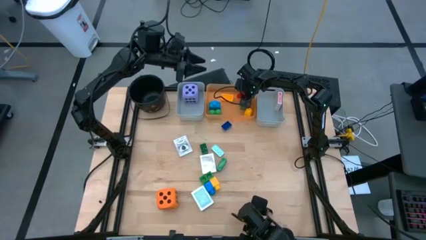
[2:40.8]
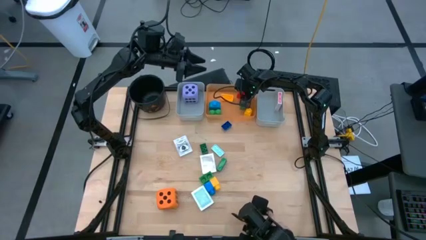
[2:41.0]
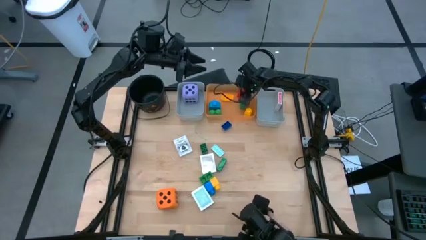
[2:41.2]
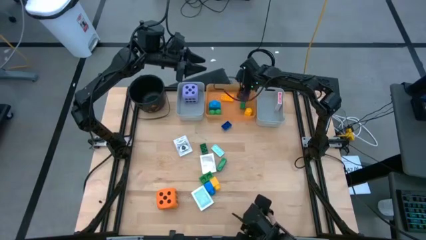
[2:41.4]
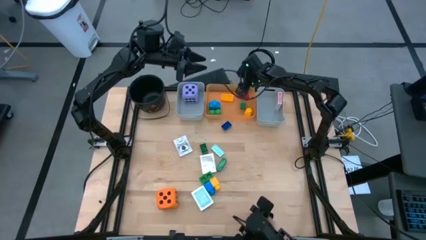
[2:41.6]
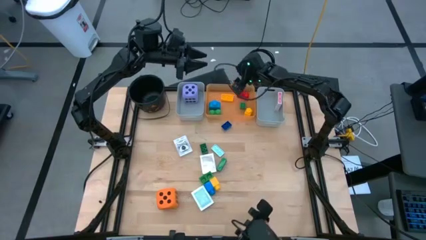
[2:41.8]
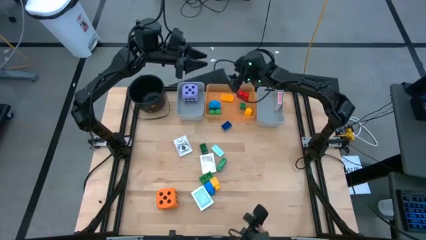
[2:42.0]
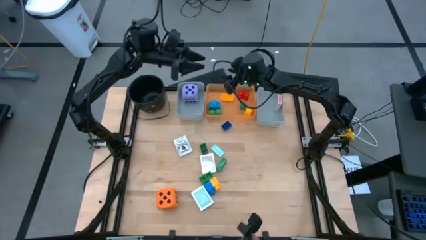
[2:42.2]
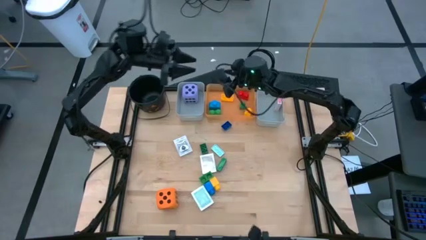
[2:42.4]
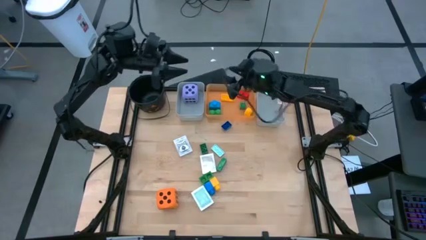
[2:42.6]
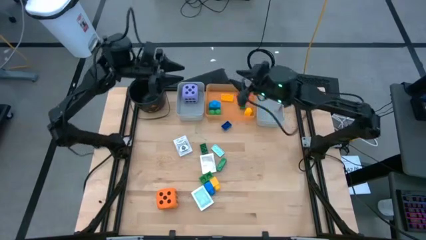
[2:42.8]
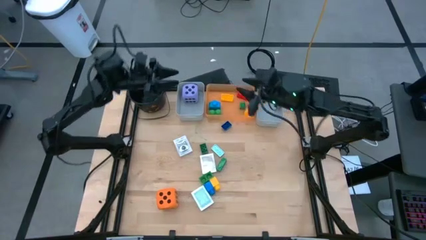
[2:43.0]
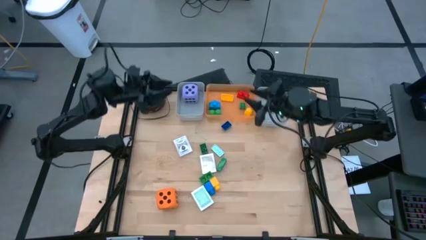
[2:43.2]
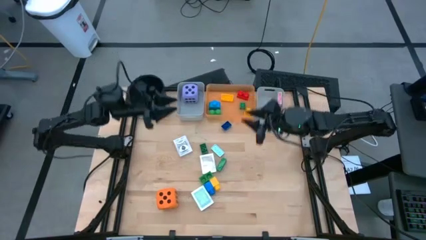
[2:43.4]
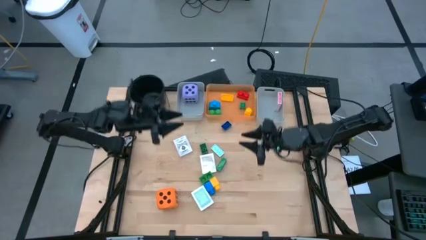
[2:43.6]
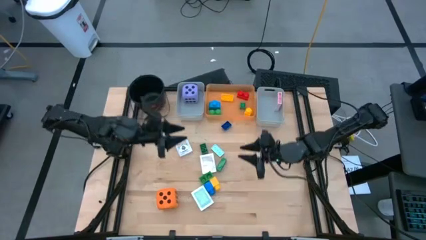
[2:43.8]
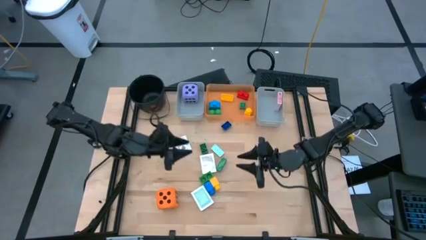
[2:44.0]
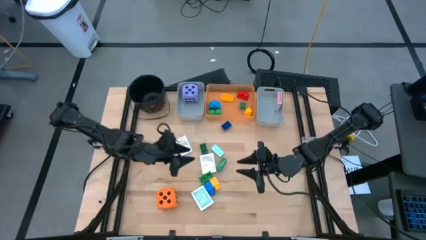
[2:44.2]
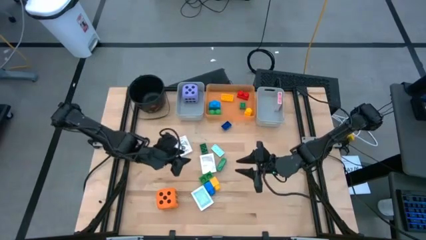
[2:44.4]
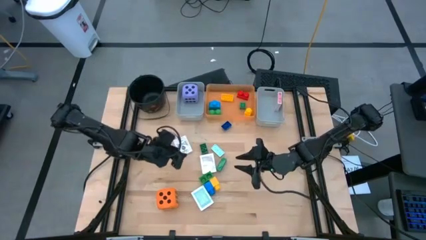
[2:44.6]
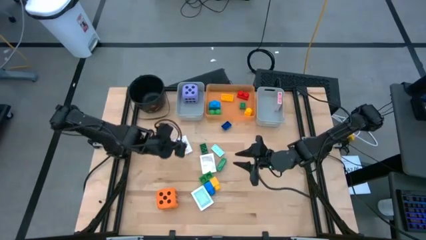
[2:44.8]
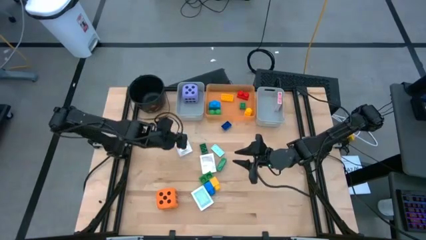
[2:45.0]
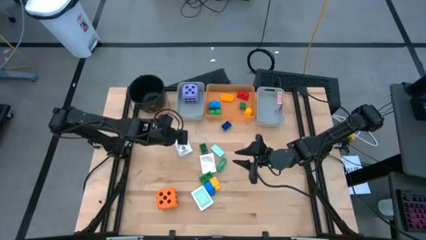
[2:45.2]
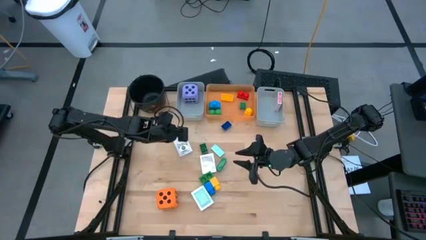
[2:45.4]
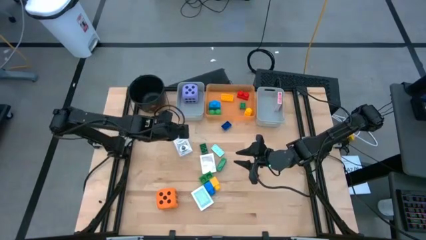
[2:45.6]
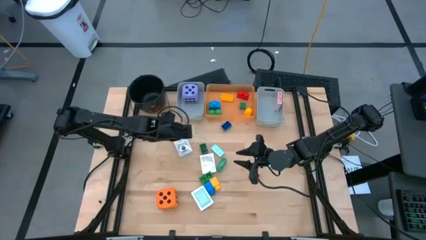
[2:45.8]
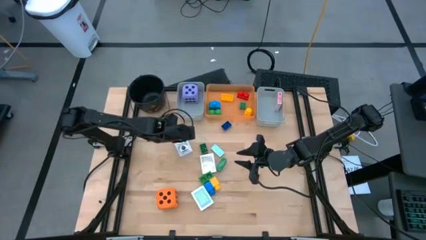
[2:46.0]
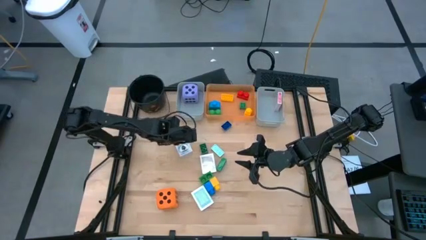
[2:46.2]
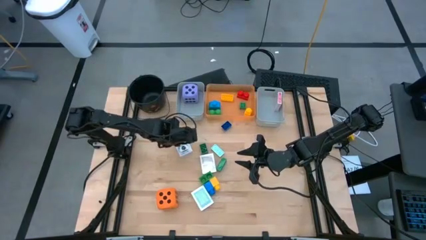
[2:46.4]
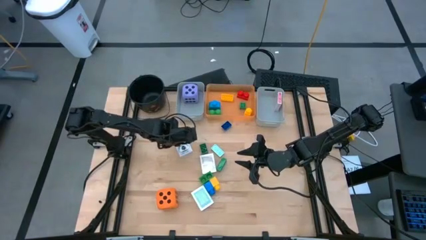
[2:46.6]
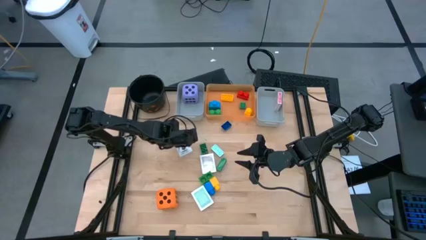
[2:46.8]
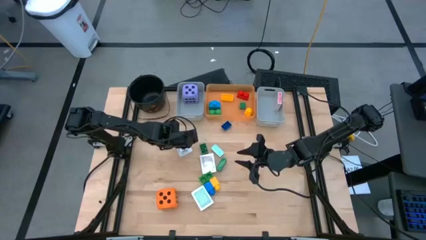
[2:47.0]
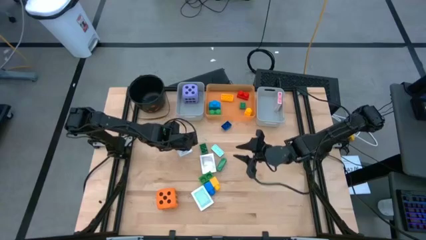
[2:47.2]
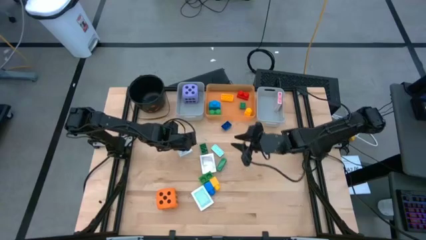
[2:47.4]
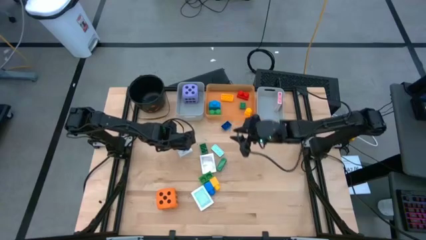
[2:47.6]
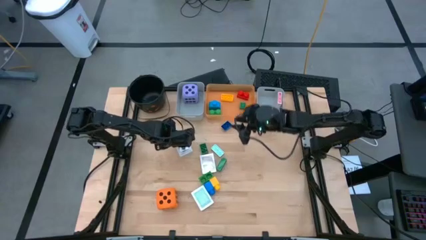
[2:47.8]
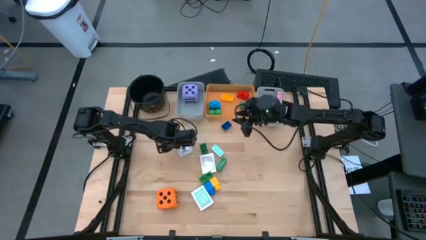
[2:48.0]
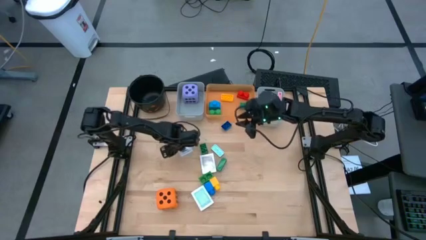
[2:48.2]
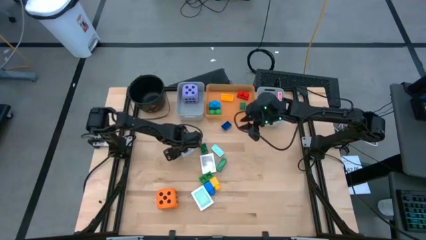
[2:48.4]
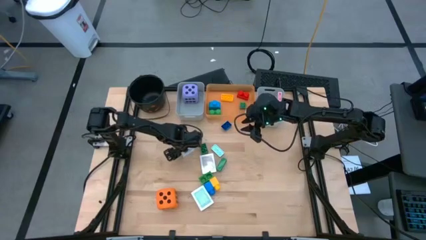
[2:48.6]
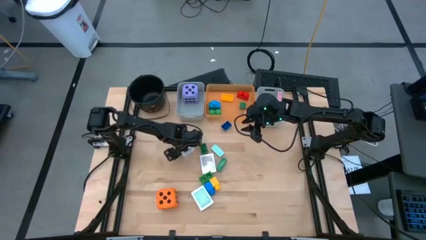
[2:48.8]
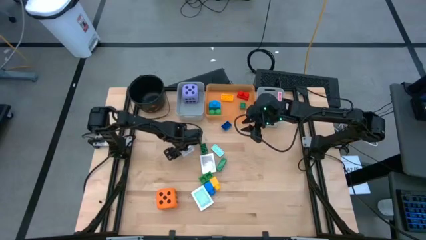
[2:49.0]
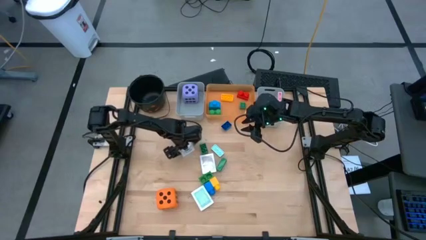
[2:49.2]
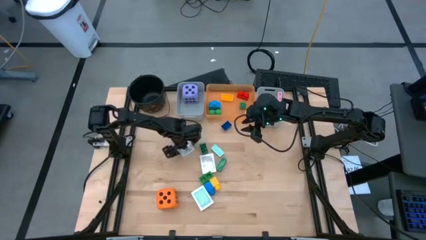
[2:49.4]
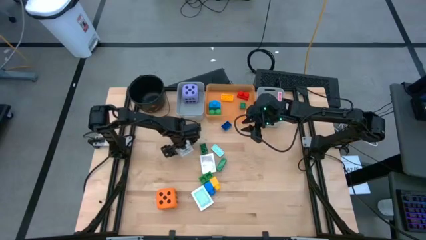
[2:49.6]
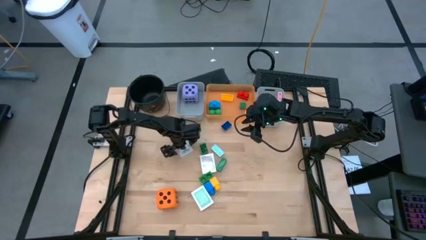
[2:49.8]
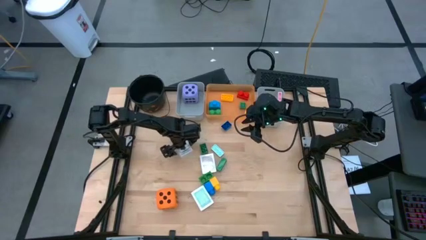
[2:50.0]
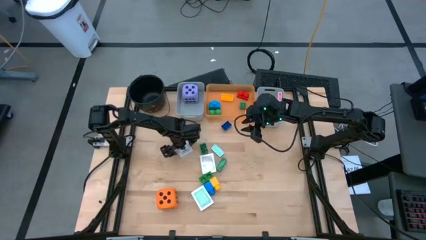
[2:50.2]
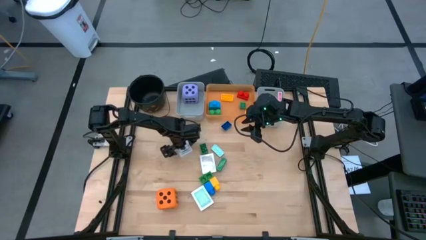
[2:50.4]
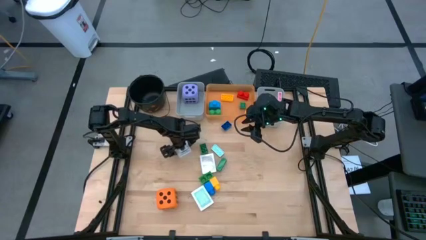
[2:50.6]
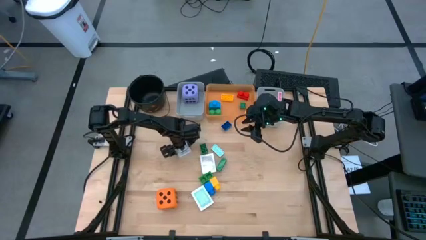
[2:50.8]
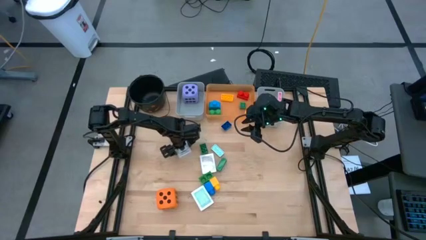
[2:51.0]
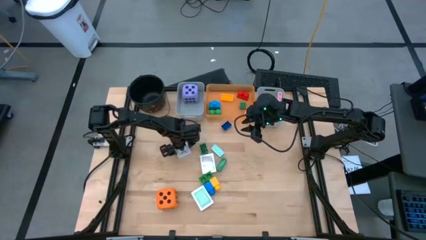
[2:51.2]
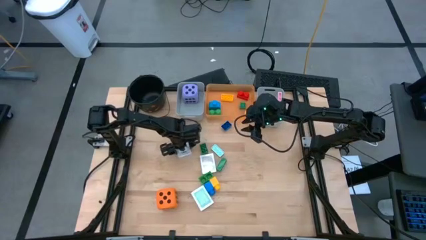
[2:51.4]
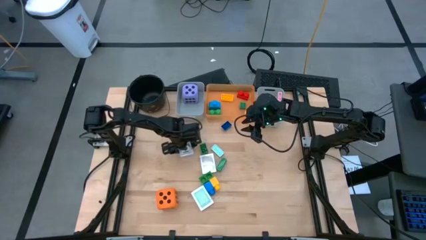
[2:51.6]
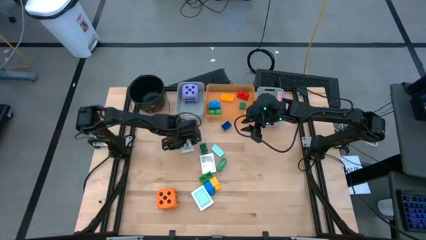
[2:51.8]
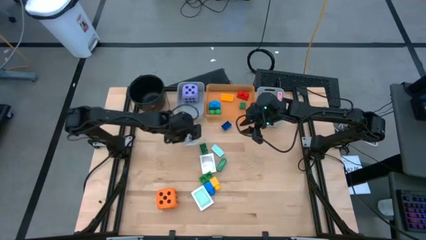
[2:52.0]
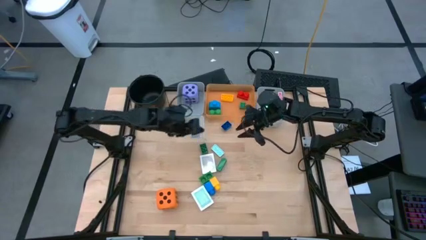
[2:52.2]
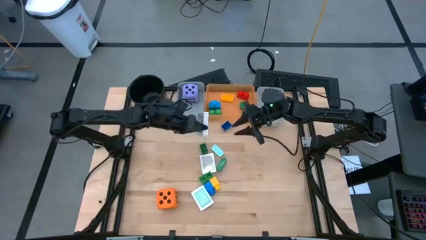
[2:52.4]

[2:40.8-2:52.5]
Task: Pick & Place Toys
Put the black deck of cards into the right gray bin

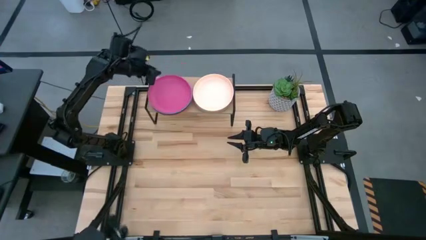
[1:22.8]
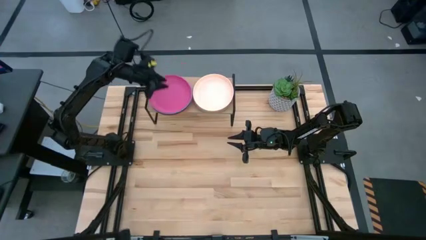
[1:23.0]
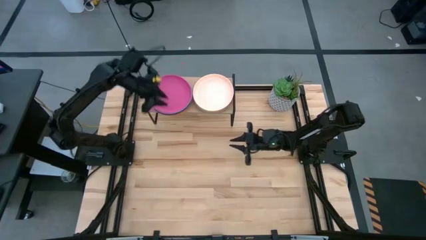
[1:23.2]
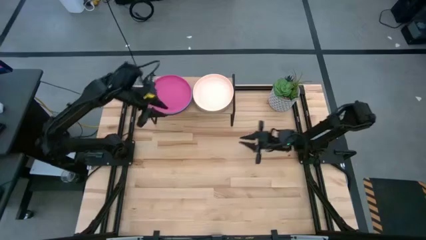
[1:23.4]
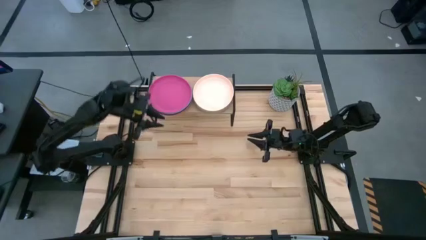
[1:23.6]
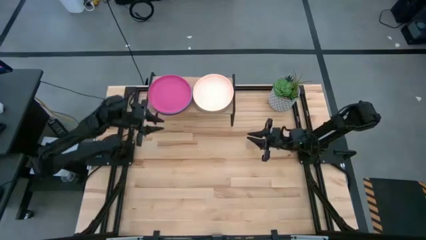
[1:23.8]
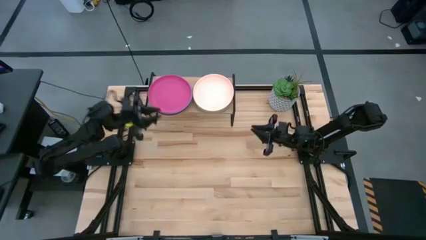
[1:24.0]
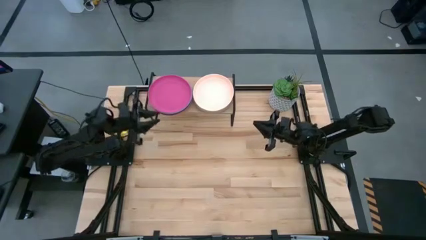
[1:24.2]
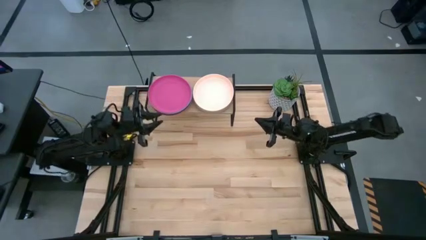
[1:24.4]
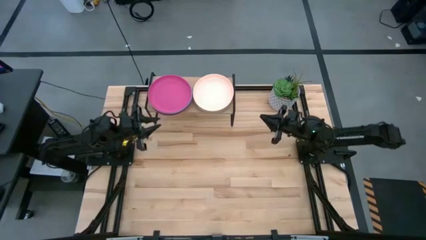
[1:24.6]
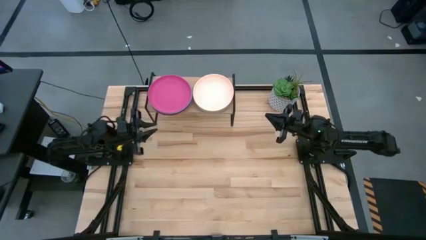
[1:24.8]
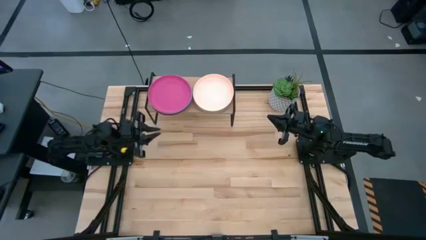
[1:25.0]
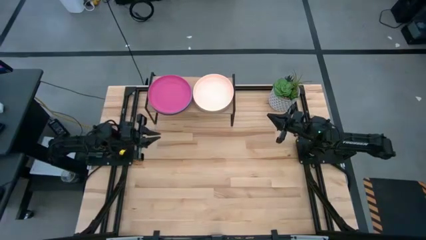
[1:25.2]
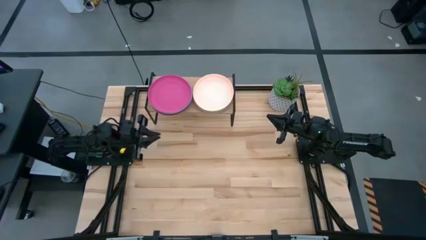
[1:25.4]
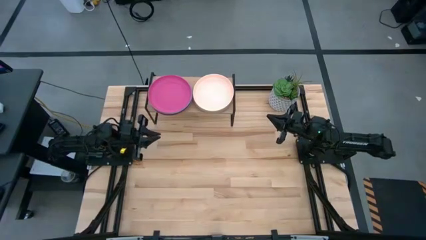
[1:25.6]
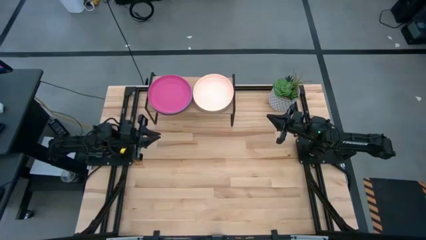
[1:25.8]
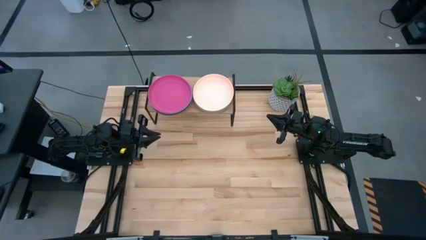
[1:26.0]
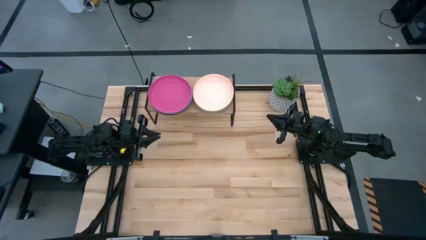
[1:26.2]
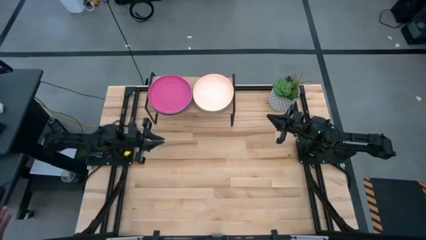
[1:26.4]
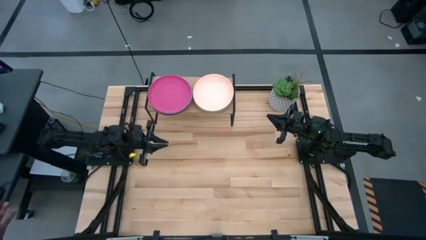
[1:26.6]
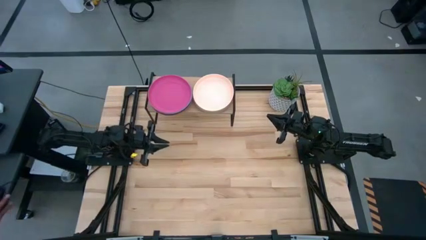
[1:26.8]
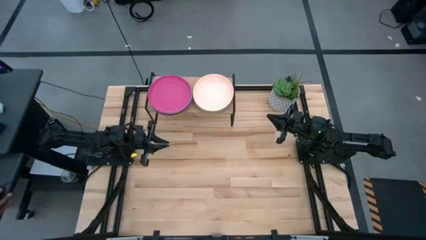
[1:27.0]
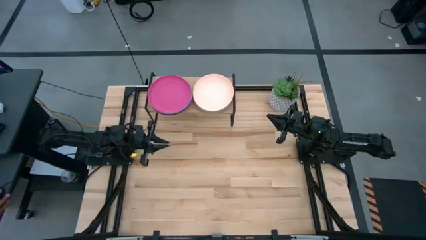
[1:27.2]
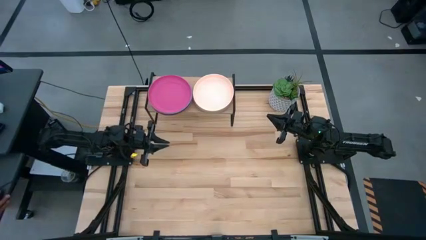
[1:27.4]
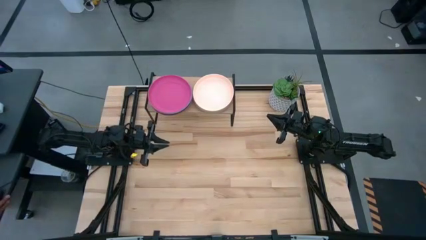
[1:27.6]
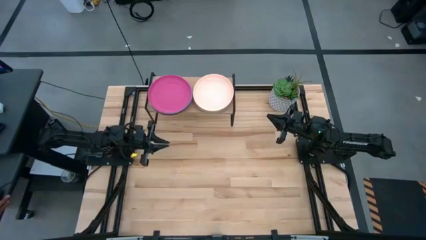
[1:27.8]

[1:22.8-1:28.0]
Task: Place and stack plates onto a shelf
Return to Home Position
